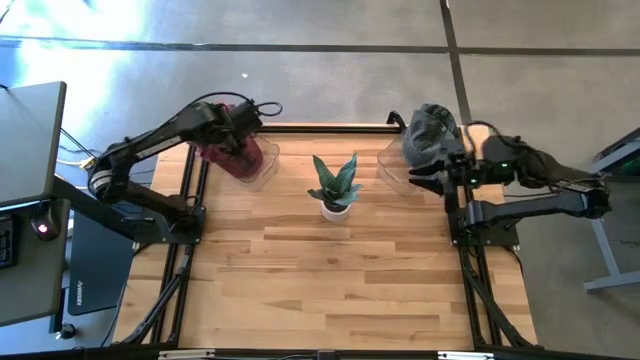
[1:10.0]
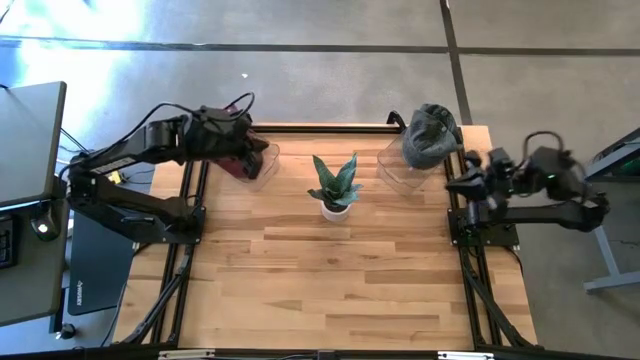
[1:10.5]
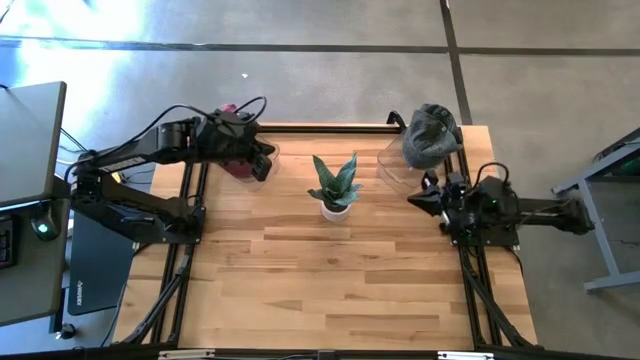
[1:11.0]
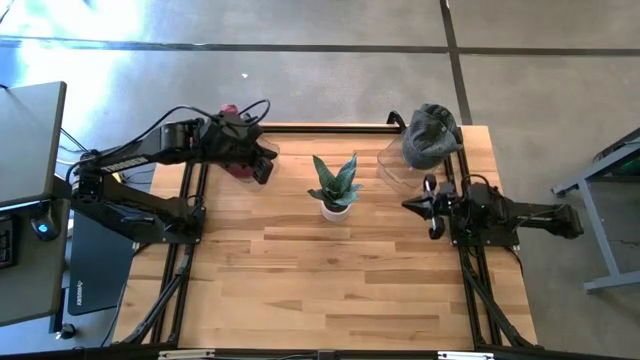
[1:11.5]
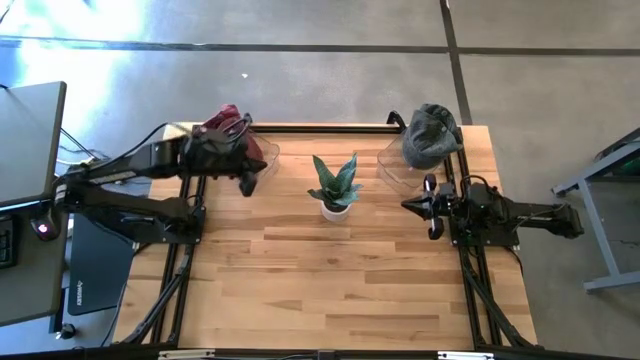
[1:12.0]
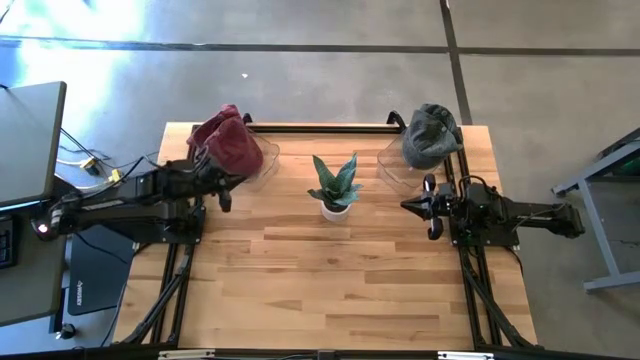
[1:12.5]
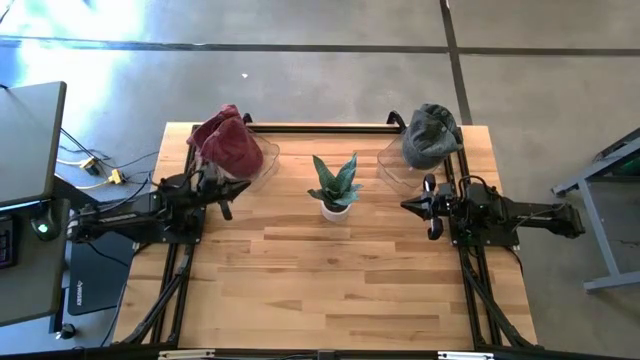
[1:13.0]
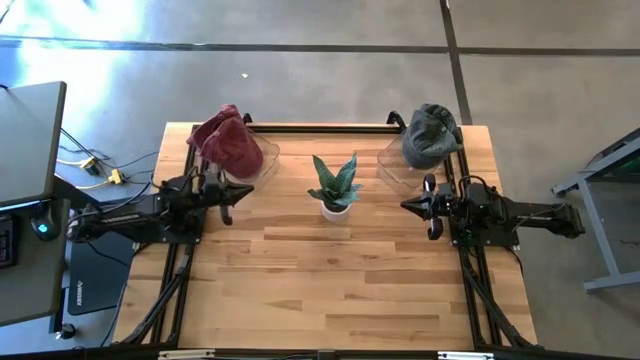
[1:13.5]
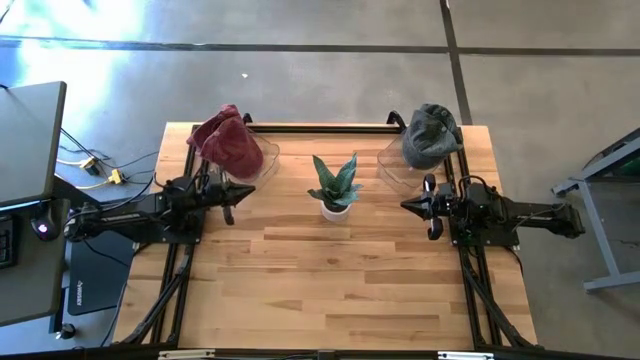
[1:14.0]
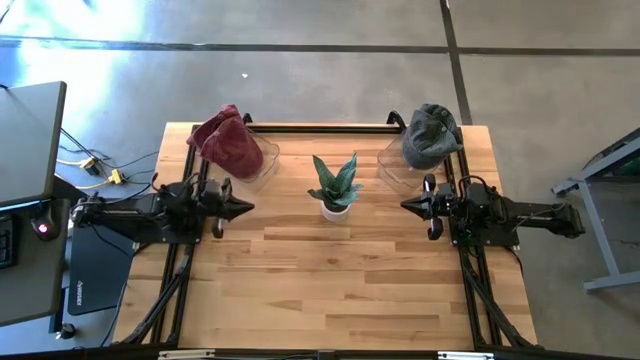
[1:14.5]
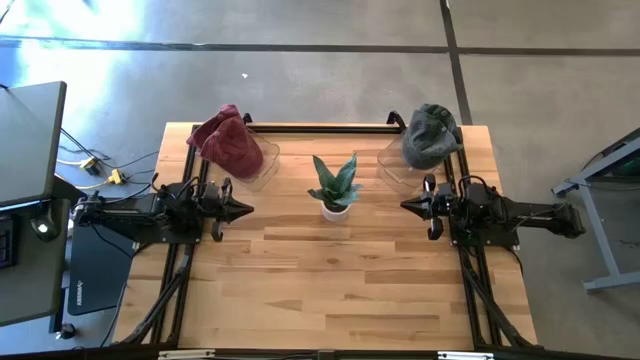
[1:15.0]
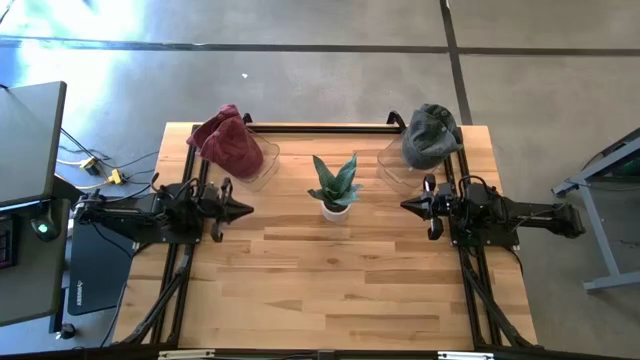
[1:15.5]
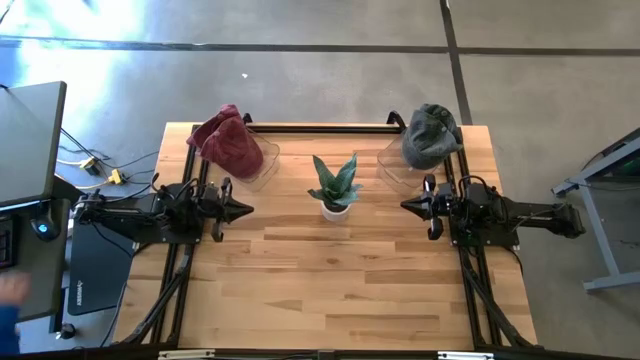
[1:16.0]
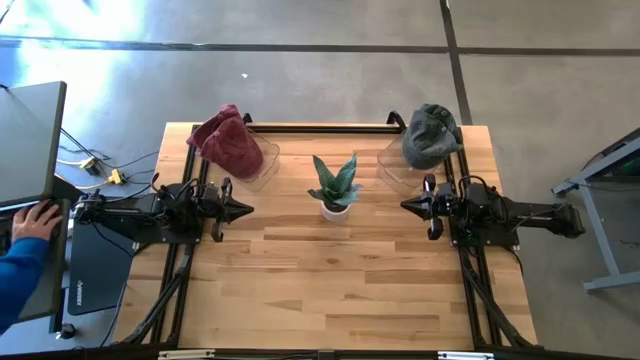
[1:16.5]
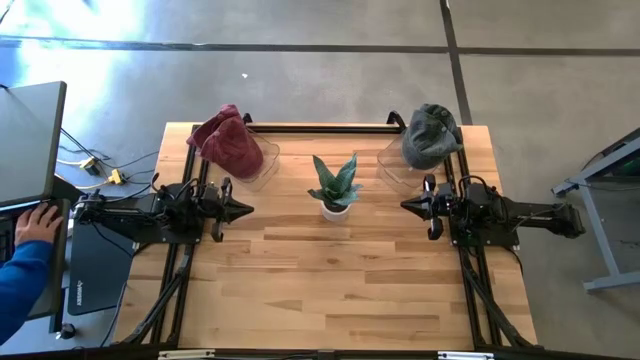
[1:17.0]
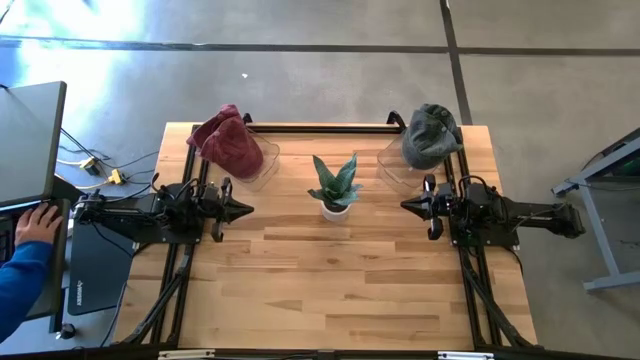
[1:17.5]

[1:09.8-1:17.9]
Task: Pick & Place hat
Return to Home Position

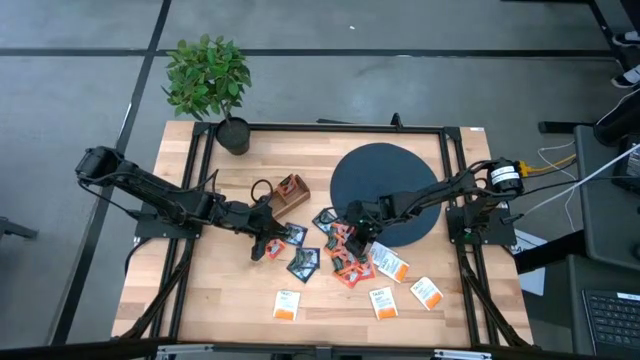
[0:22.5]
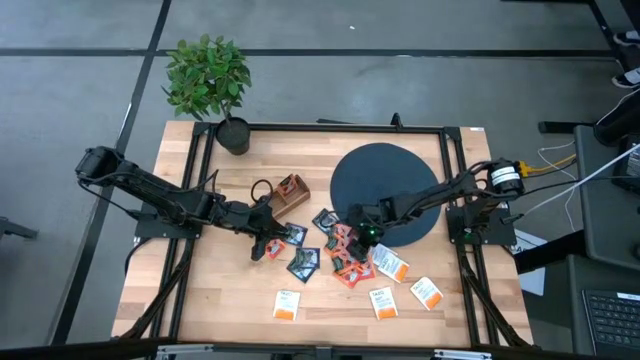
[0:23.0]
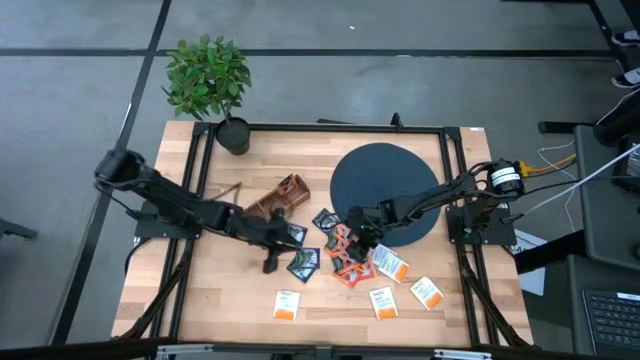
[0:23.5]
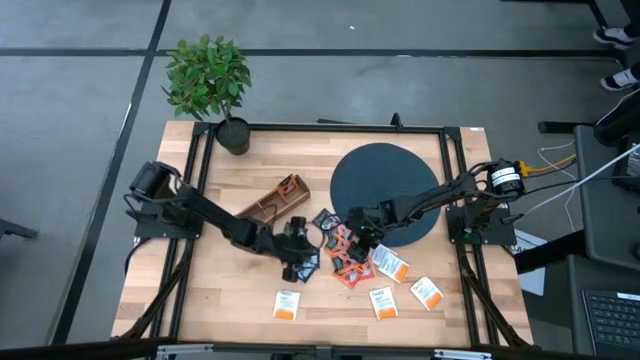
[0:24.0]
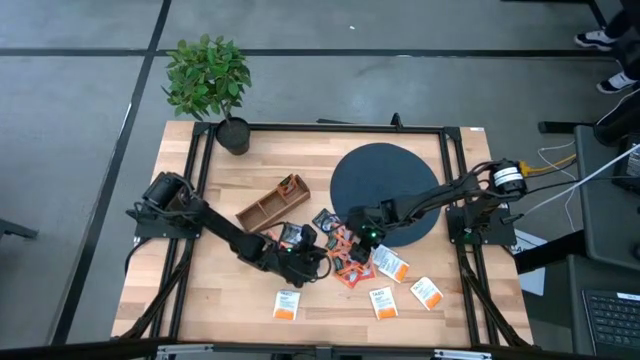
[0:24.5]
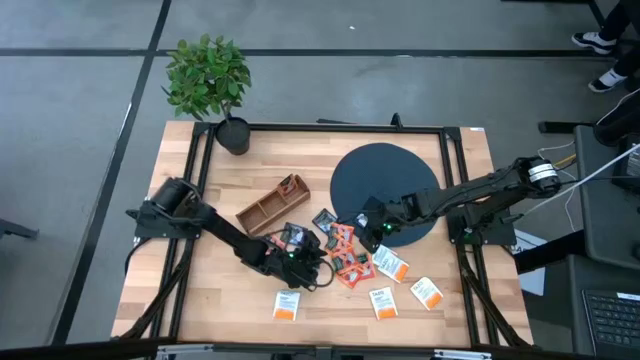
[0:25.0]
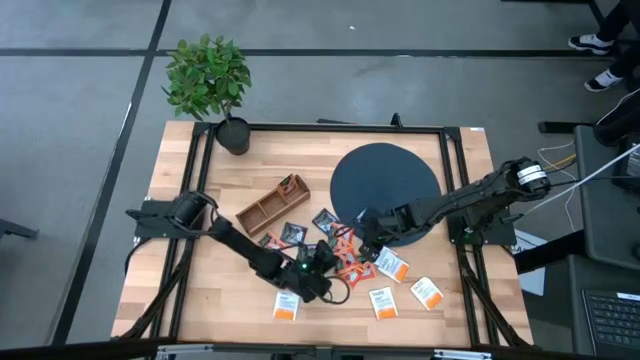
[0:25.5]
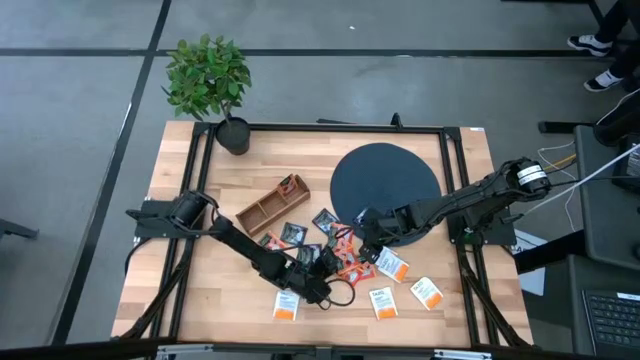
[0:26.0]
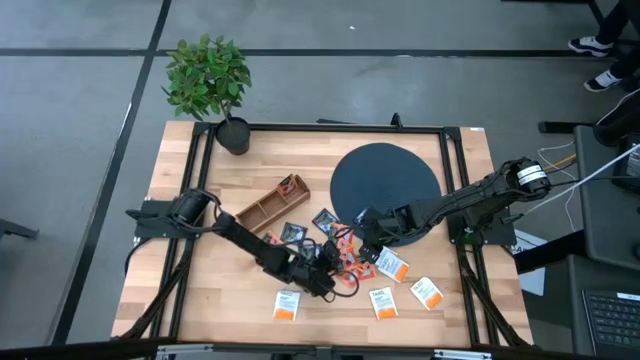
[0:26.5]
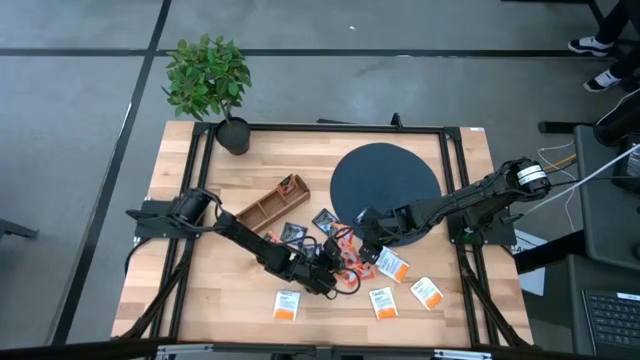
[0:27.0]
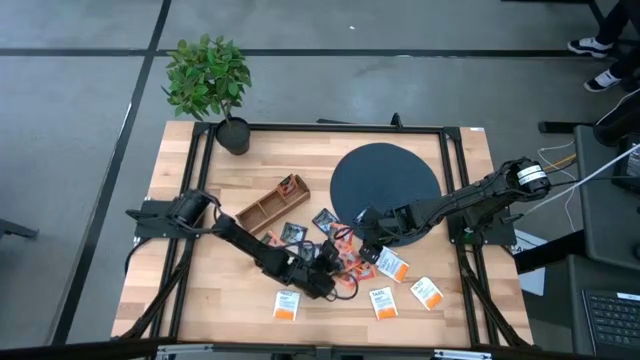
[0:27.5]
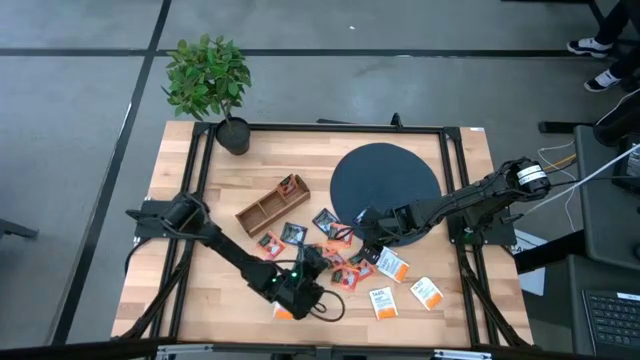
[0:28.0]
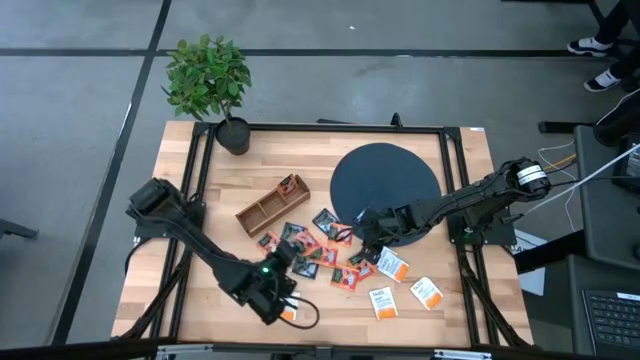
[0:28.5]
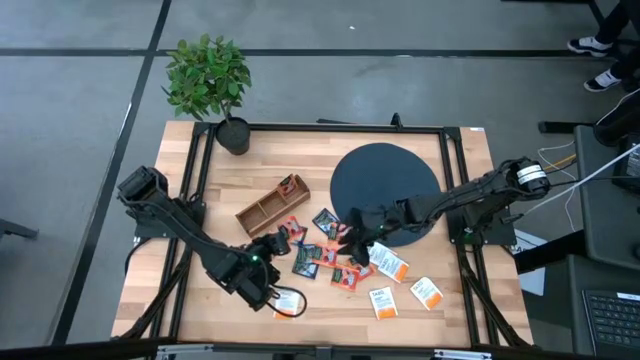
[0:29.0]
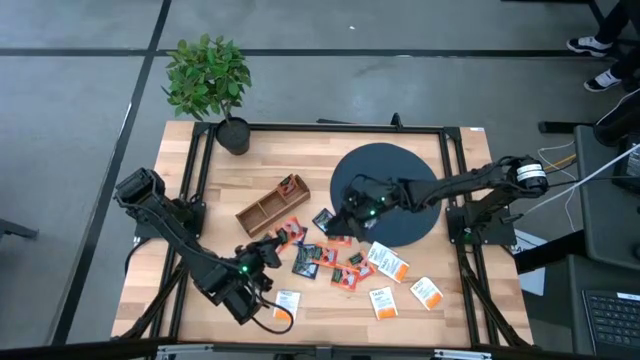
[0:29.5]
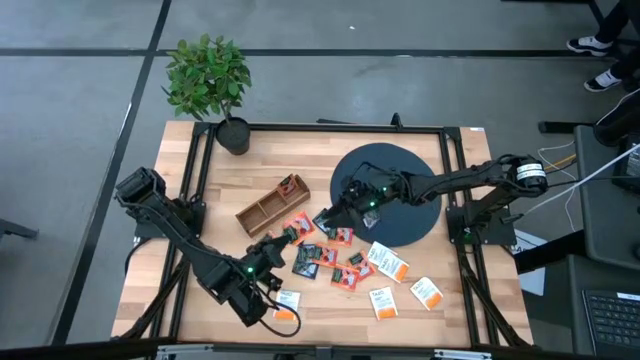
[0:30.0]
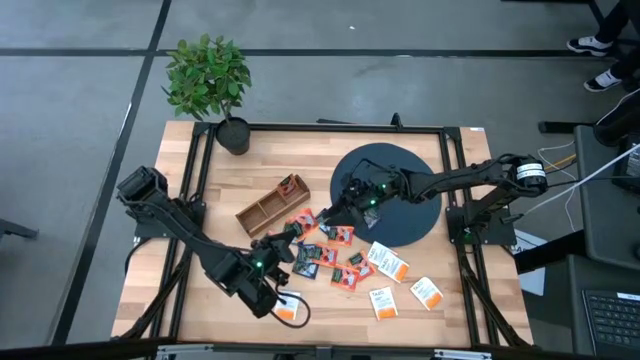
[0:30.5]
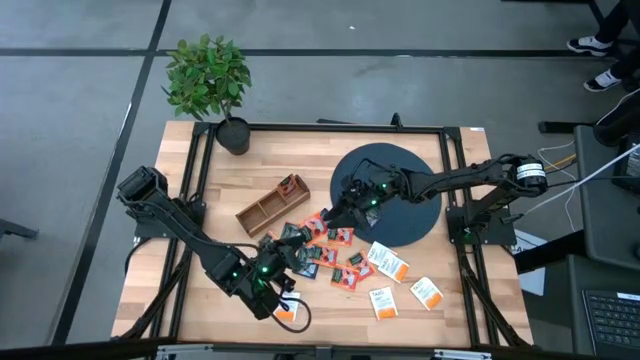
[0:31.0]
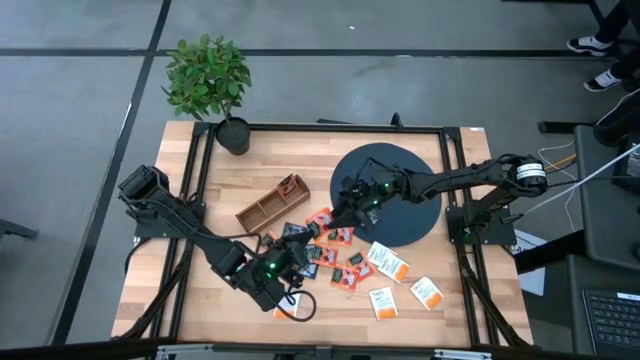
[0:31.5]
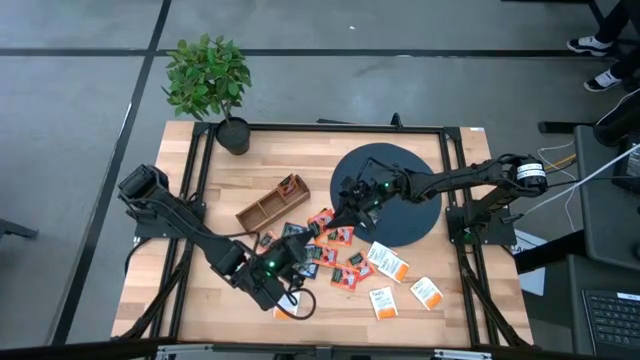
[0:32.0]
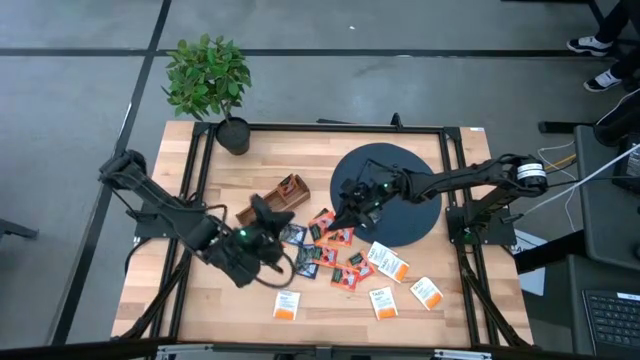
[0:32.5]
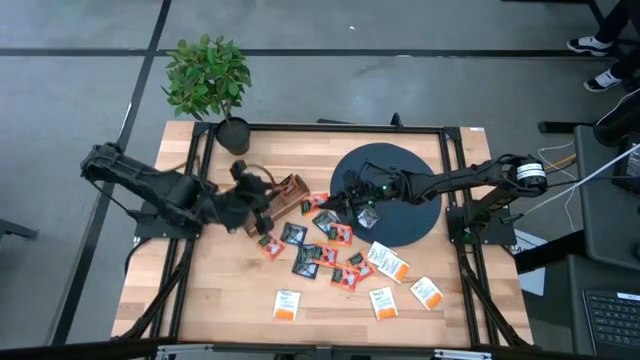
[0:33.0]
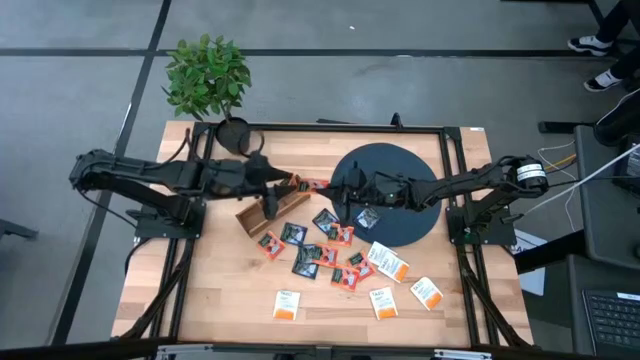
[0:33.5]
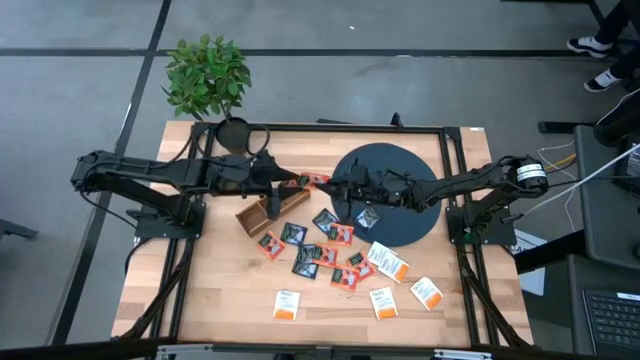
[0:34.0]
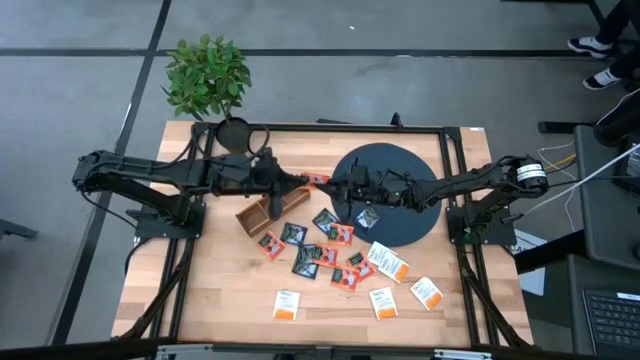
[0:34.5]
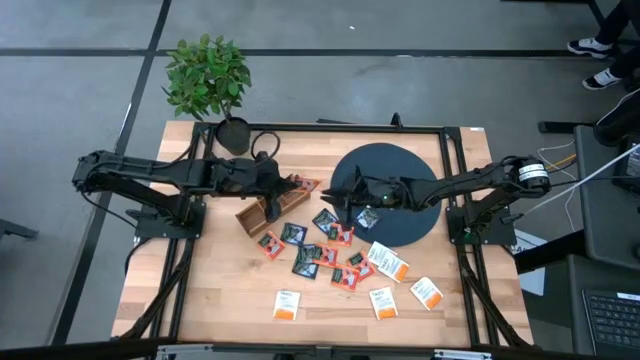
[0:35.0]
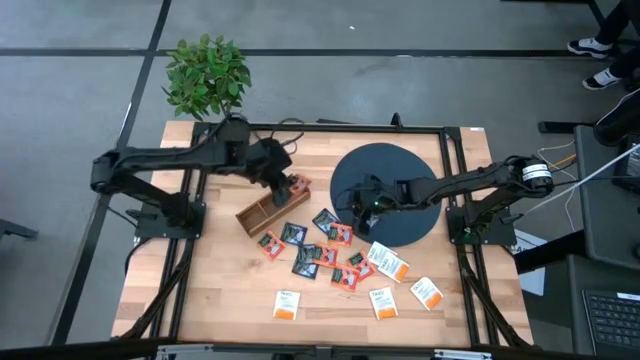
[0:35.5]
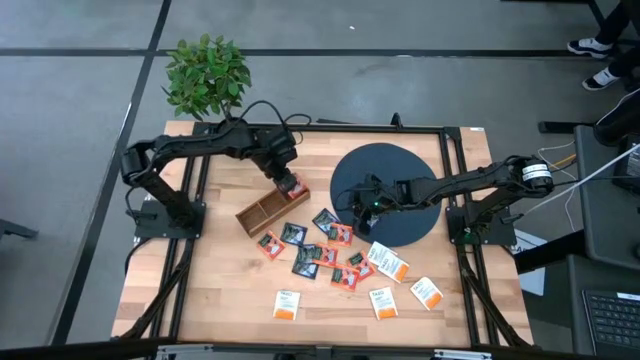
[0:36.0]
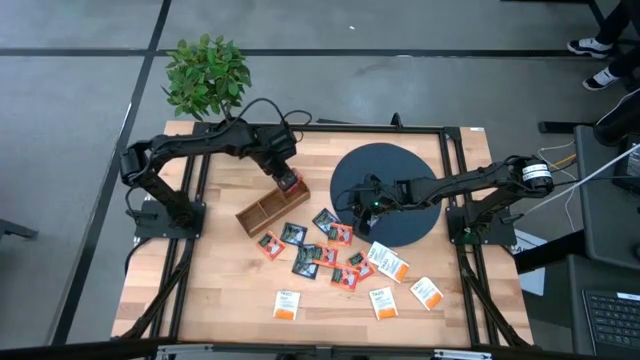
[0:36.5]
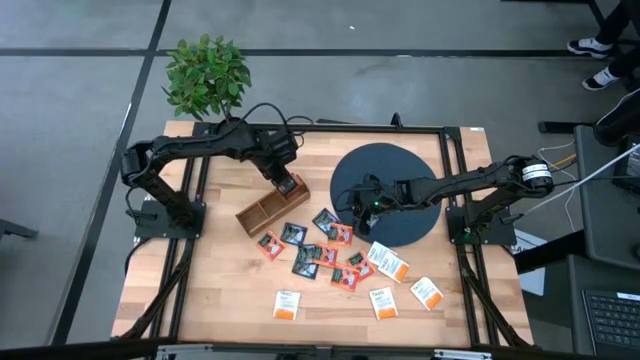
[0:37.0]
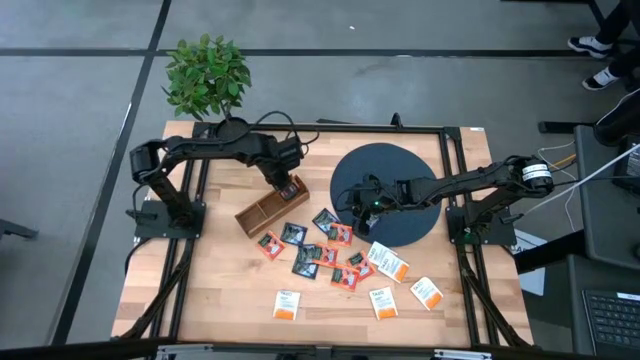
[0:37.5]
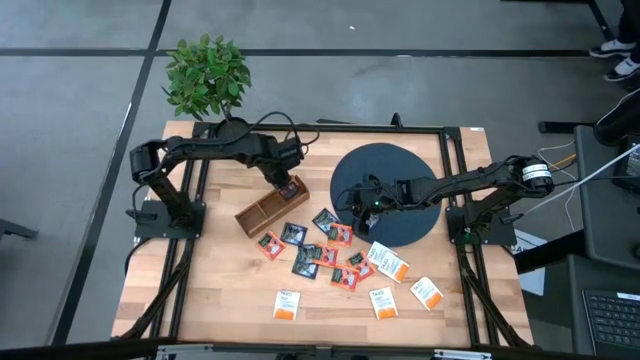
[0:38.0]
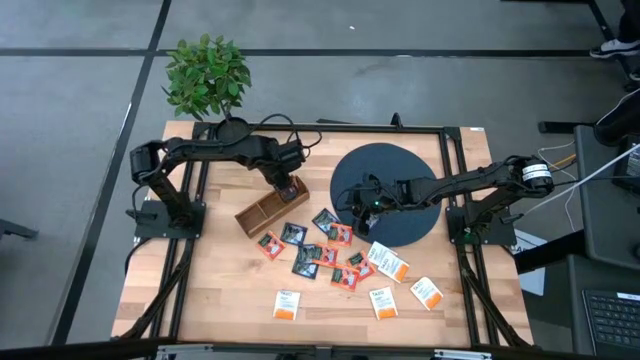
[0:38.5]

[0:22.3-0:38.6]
Task: Pick & Place Tea
Put the orange tea bag into the right section of the wooden organizer
